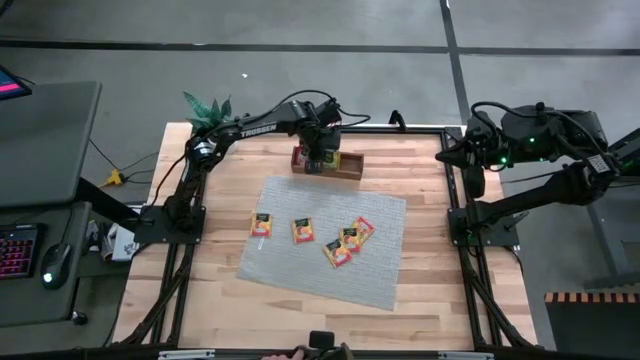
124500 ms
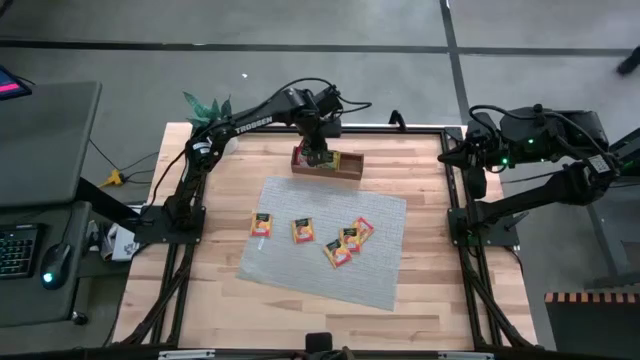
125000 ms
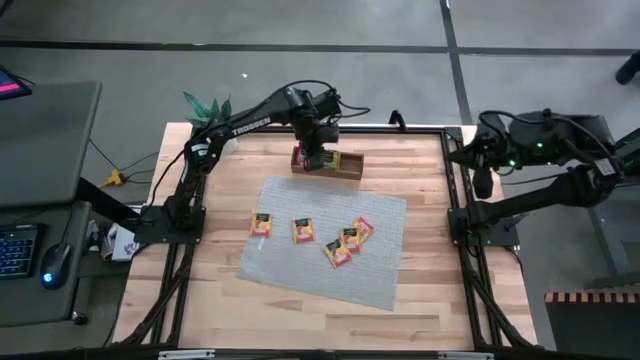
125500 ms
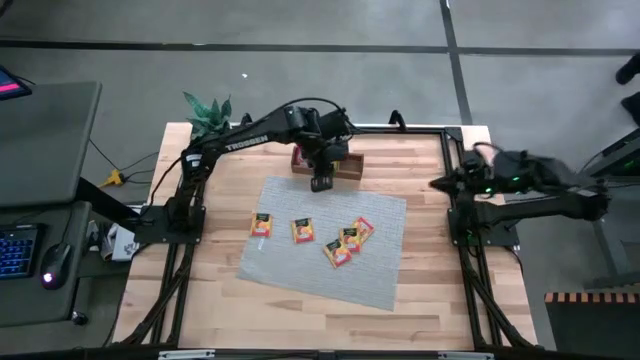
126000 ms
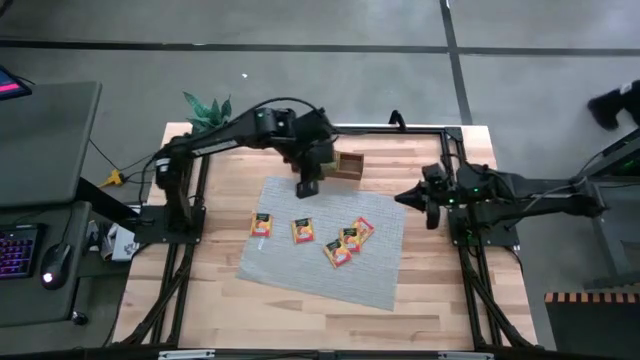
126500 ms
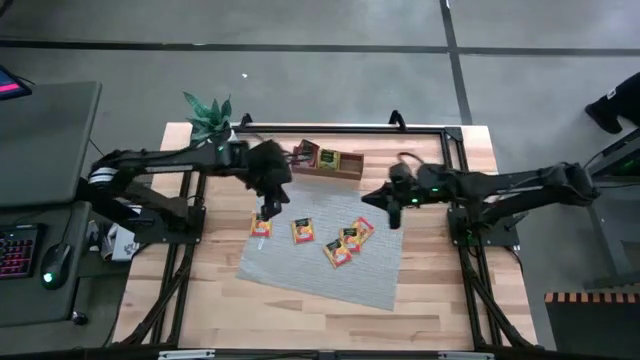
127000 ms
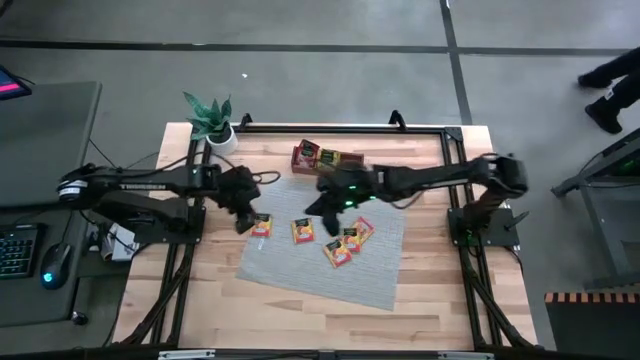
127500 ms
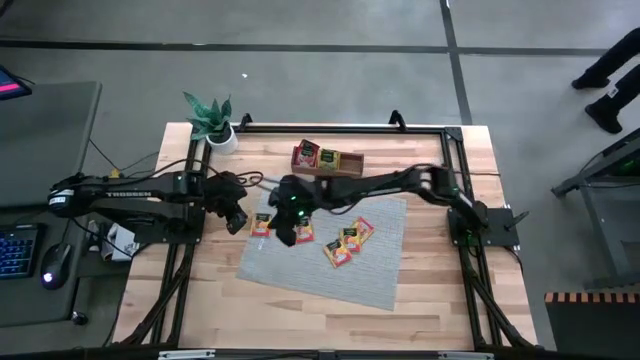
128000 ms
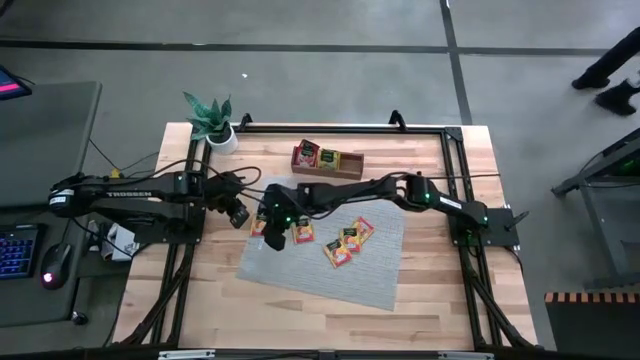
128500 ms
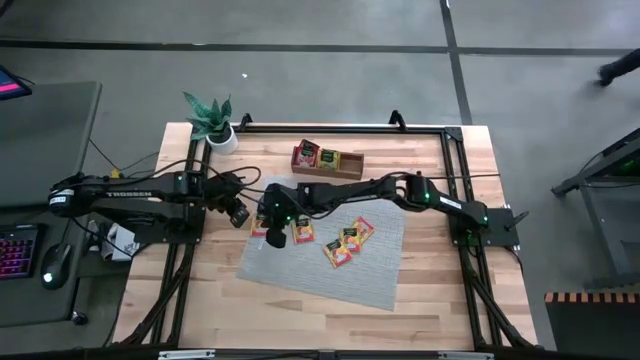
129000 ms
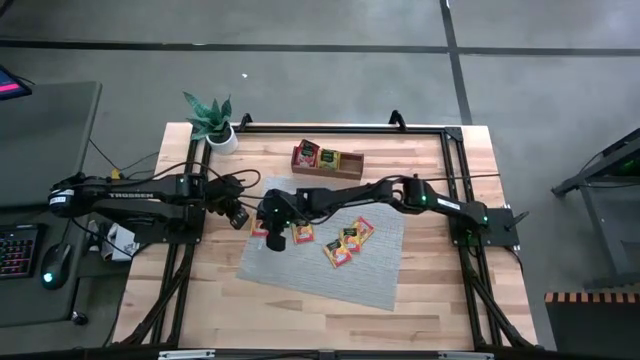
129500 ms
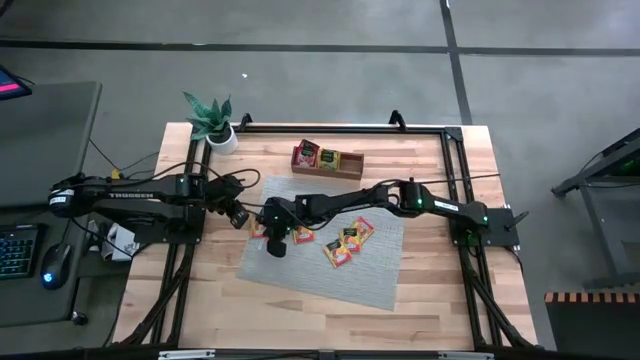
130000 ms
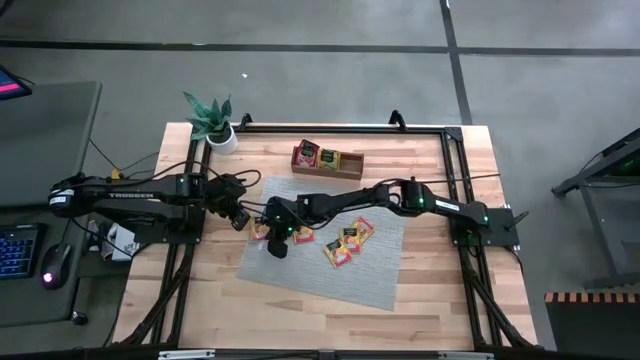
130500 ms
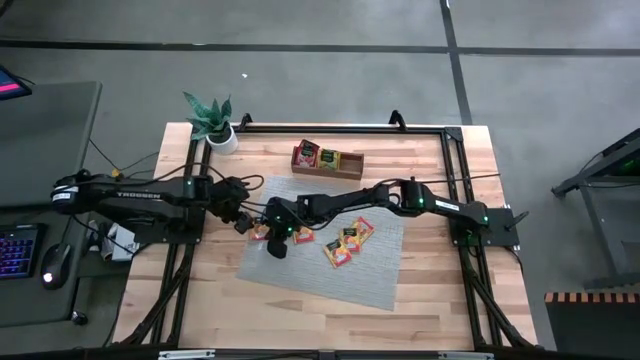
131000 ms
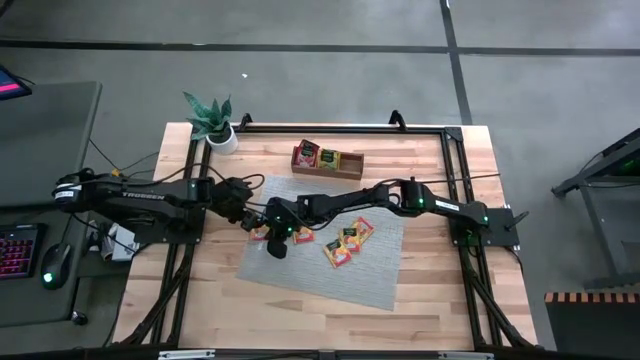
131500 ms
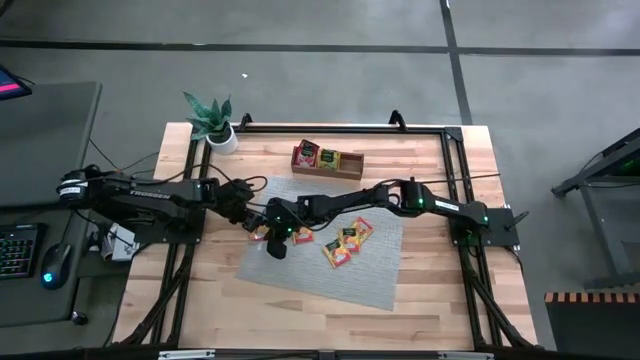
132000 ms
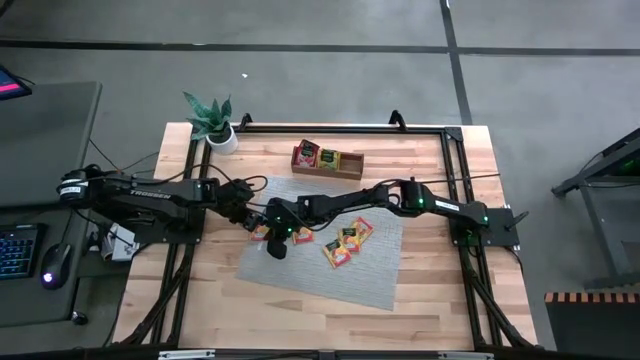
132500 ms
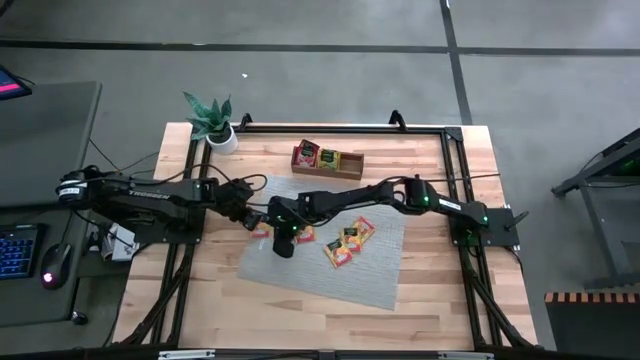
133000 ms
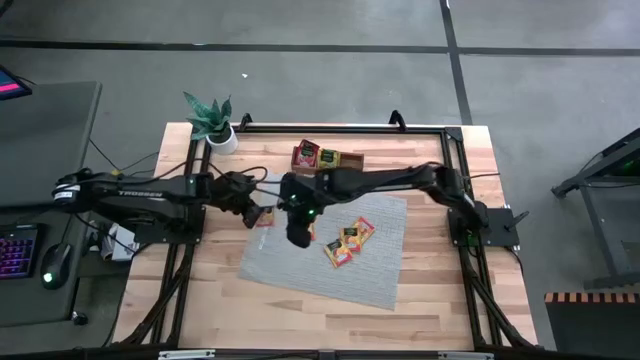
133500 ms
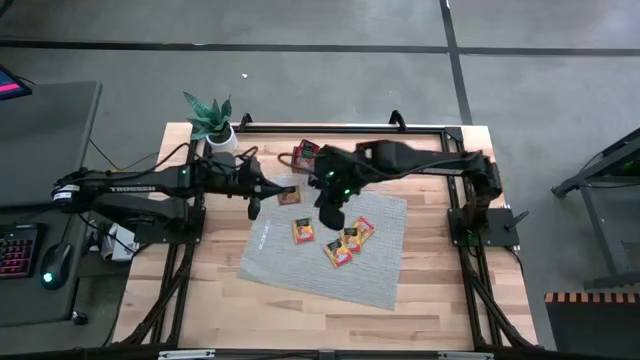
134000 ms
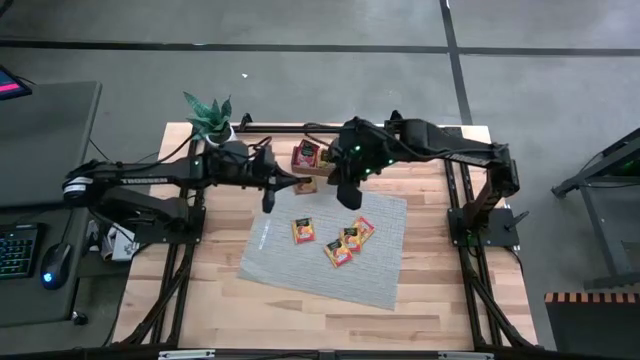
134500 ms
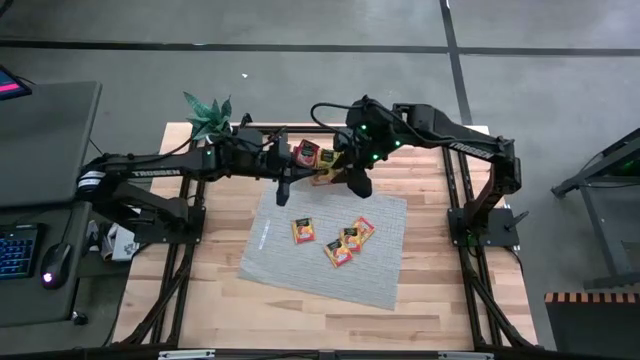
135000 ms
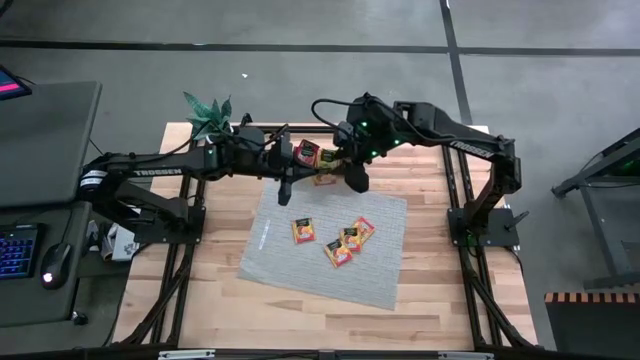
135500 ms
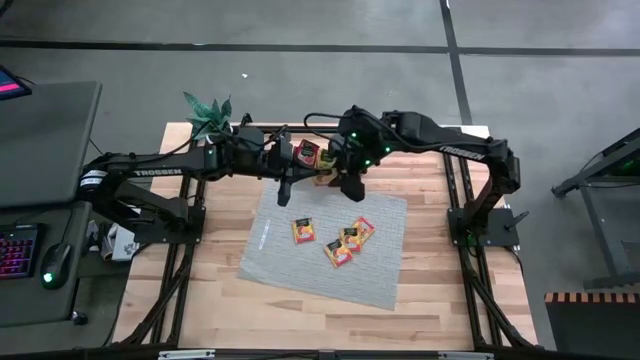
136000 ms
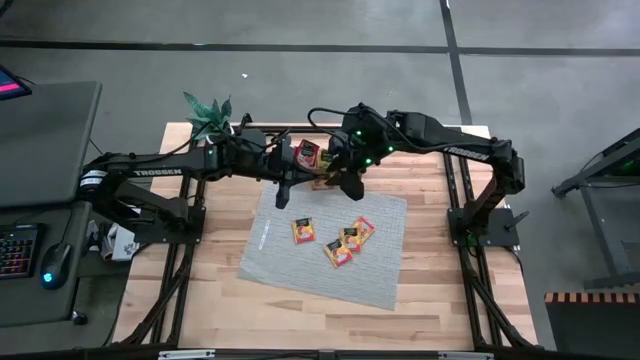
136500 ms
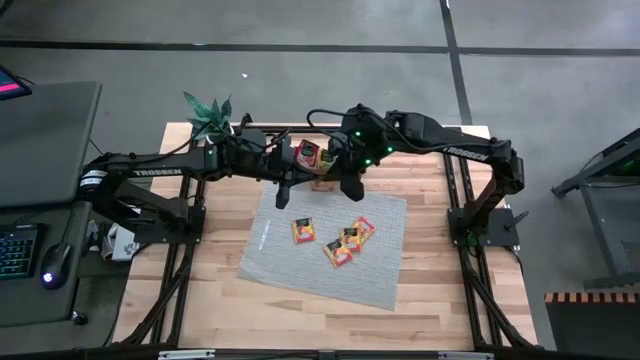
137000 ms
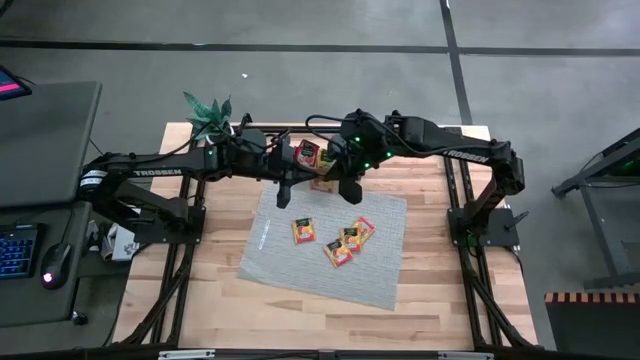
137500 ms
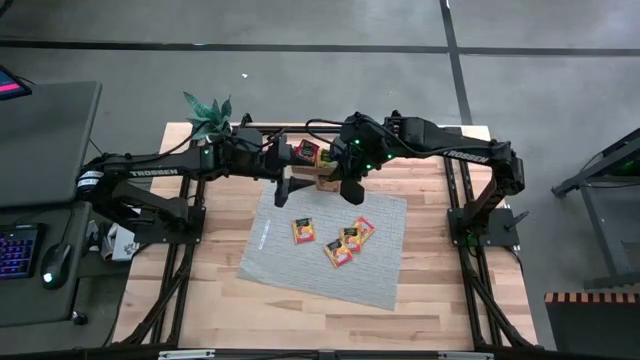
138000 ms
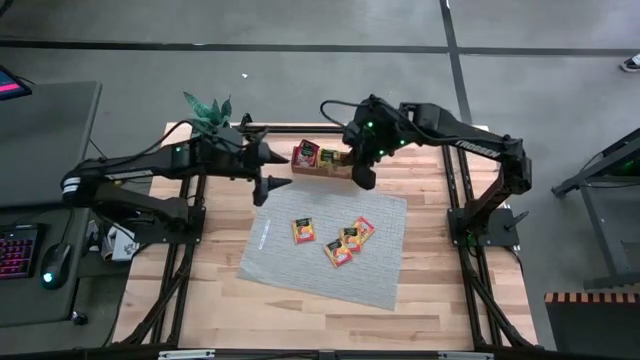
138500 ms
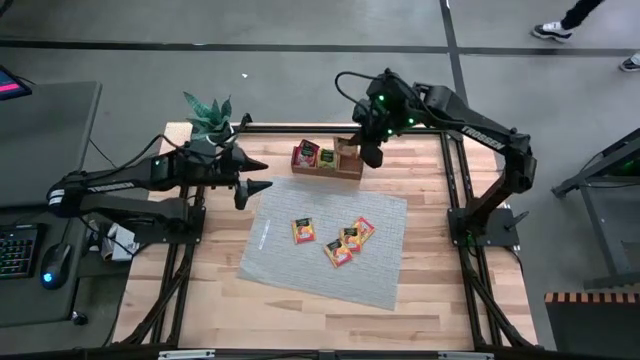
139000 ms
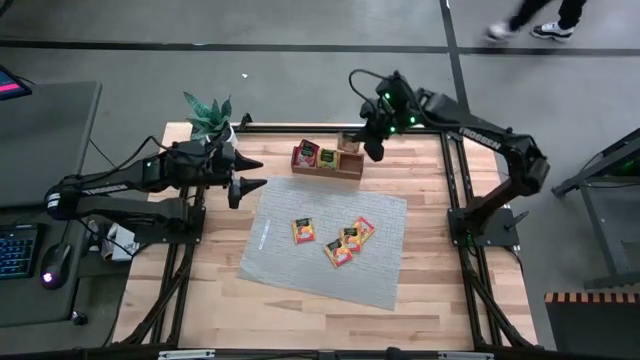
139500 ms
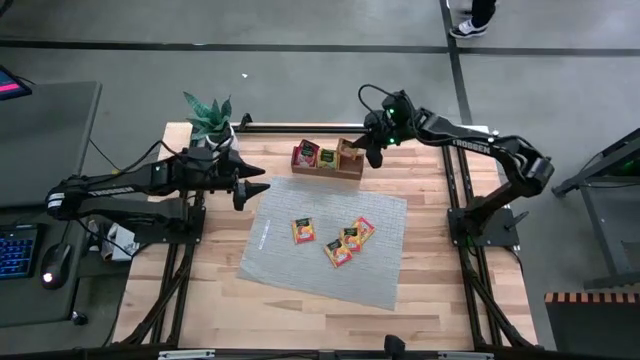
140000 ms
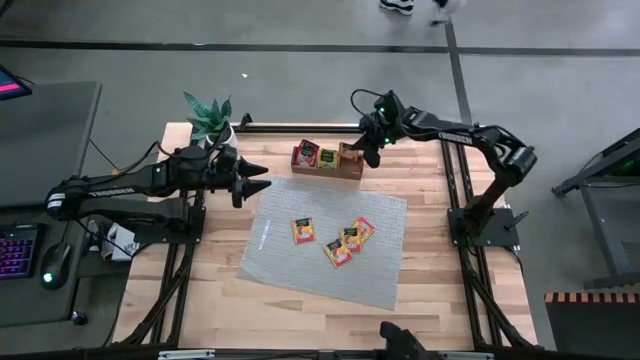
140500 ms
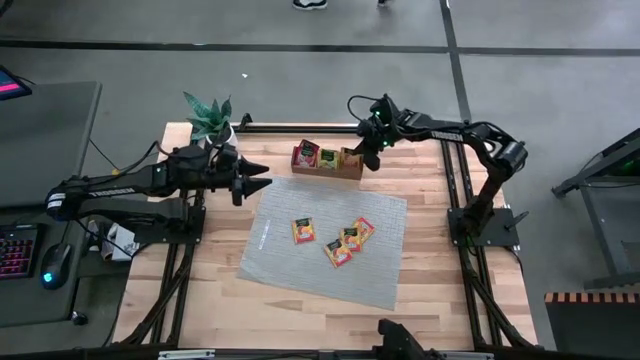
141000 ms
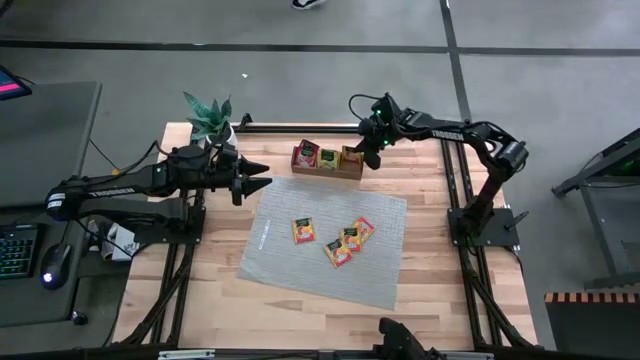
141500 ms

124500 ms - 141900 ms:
Task: Pick & Place Tea
Put the orange tea bag into the right section of the wooden organizer

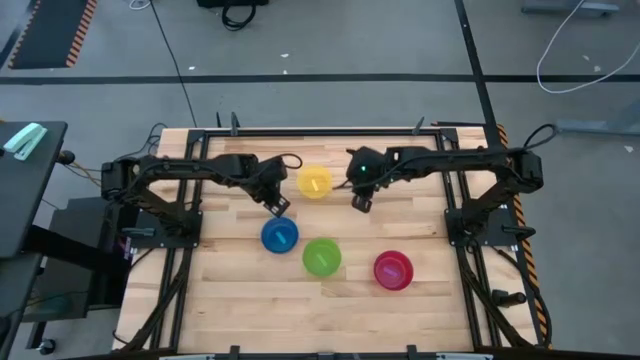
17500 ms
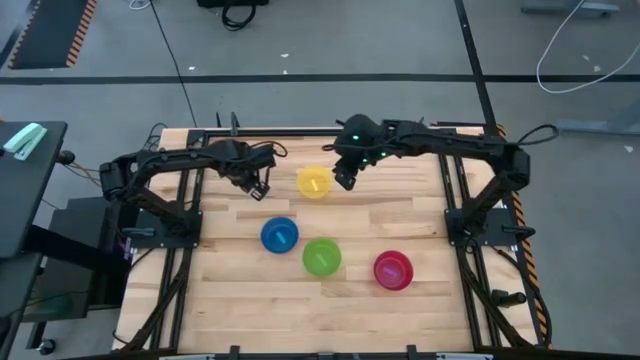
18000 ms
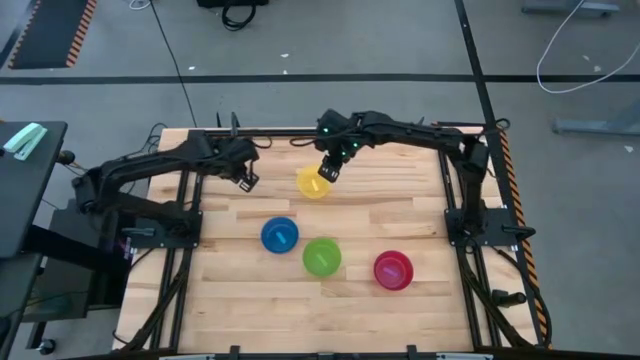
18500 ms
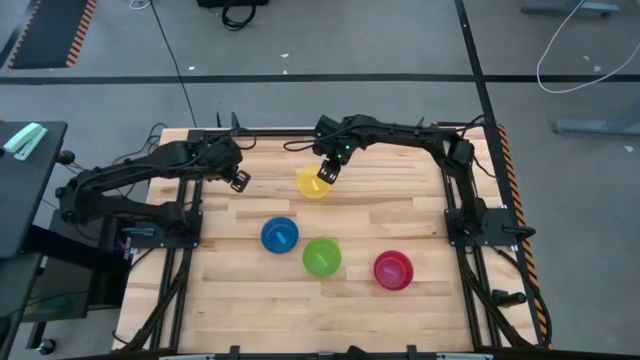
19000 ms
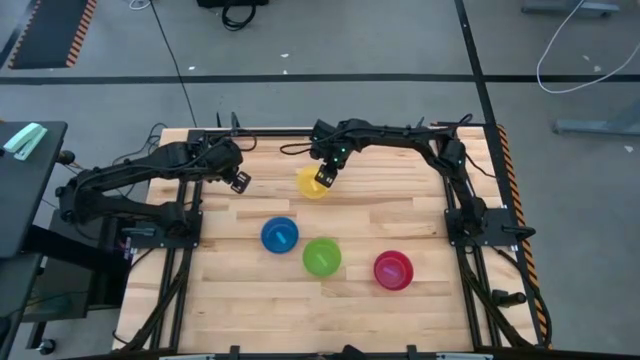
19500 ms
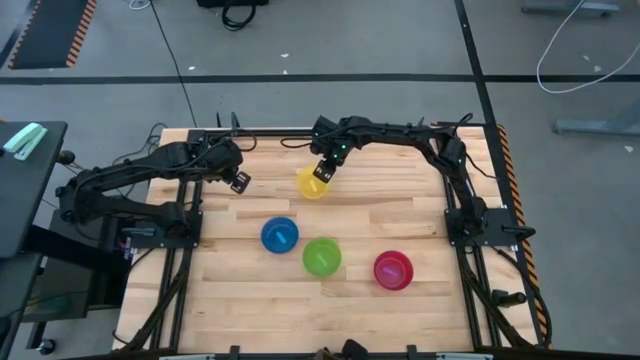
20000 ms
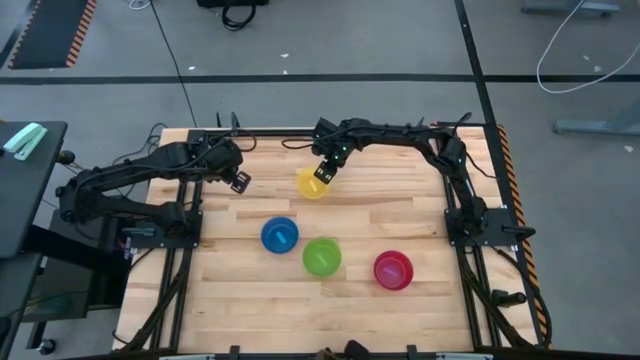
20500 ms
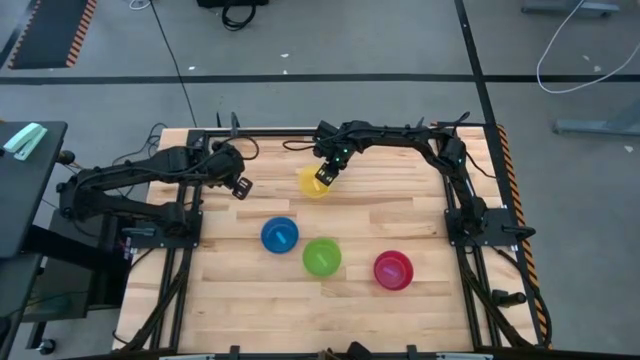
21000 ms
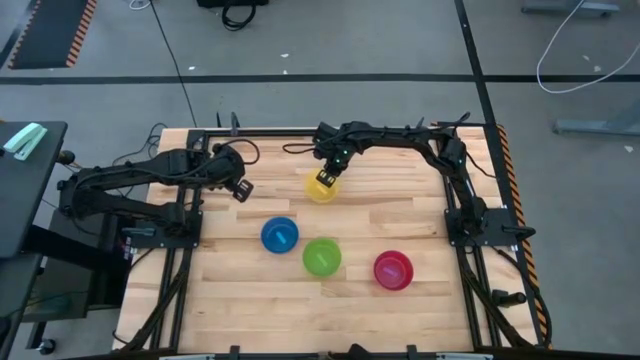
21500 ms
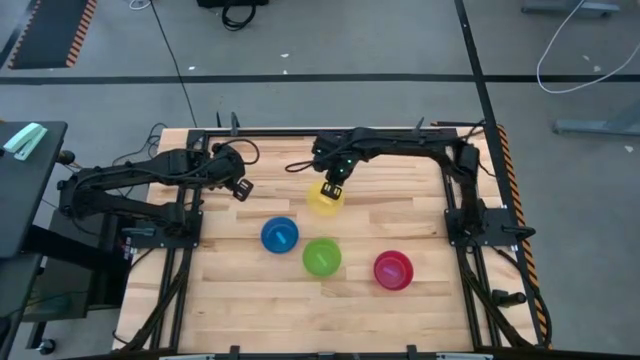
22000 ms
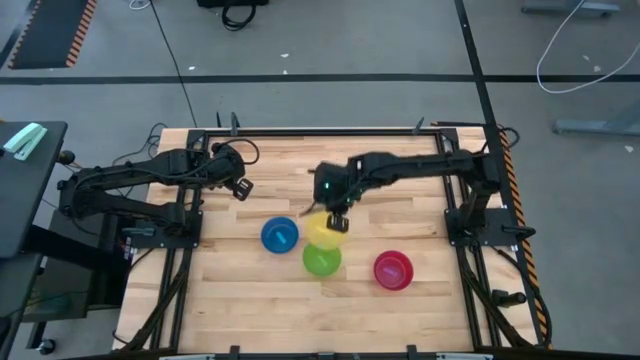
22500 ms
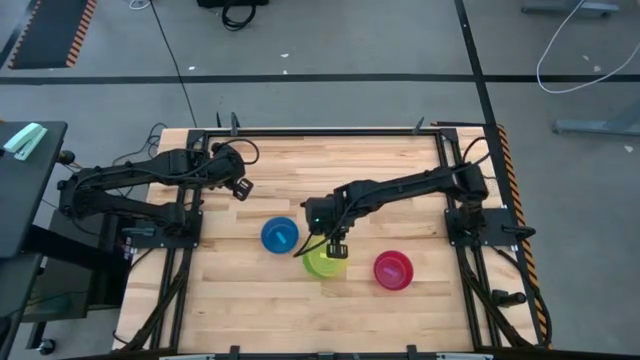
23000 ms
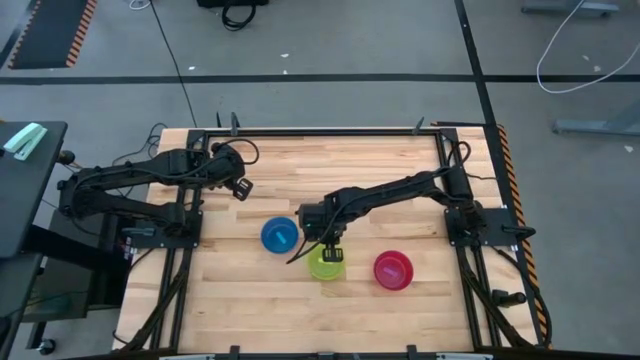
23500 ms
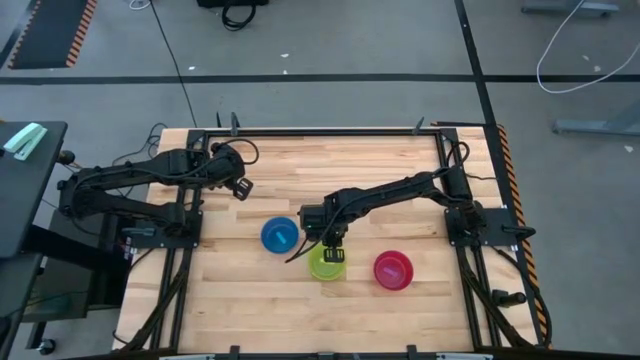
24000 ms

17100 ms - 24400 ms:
Task: Nest bowls inside each other
Stack the yellow bowl on the green bowl
